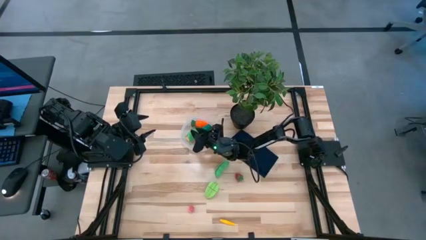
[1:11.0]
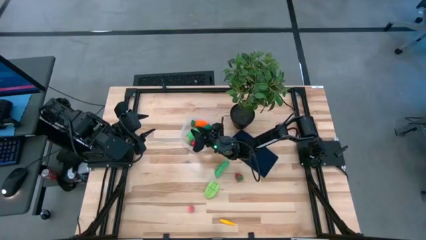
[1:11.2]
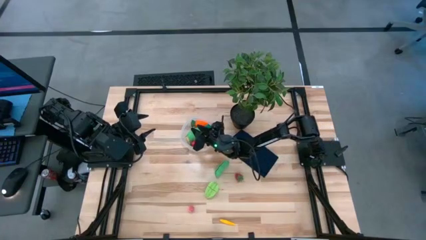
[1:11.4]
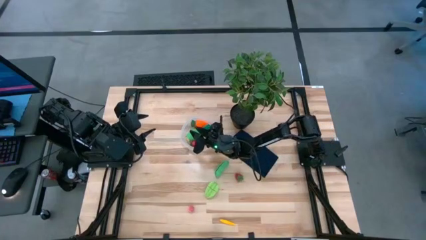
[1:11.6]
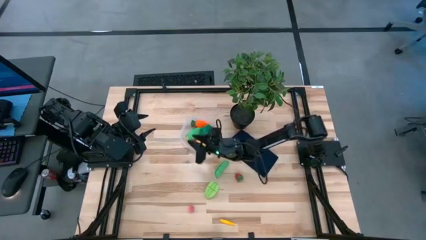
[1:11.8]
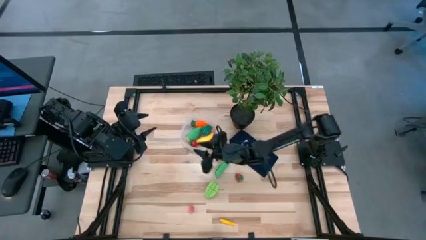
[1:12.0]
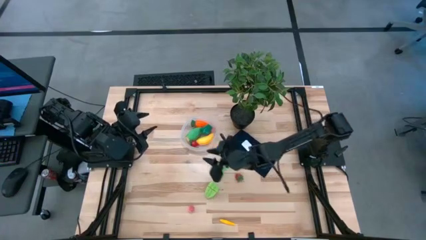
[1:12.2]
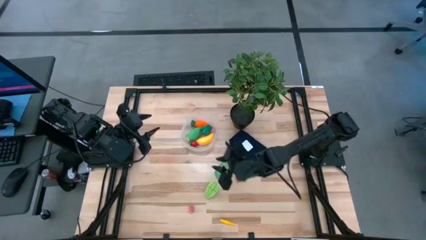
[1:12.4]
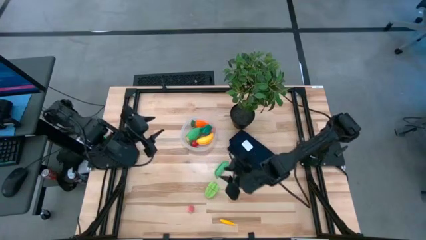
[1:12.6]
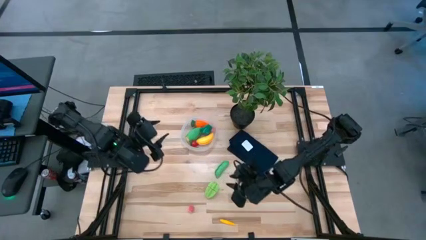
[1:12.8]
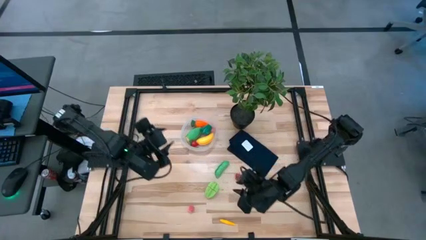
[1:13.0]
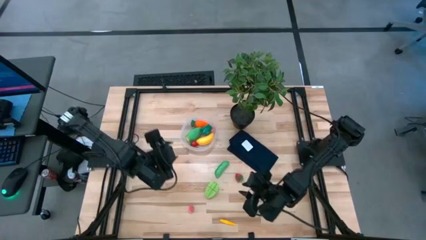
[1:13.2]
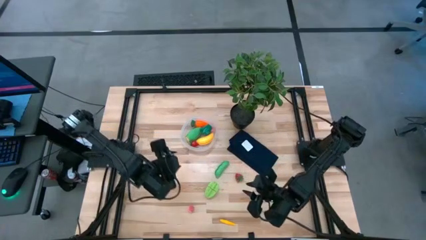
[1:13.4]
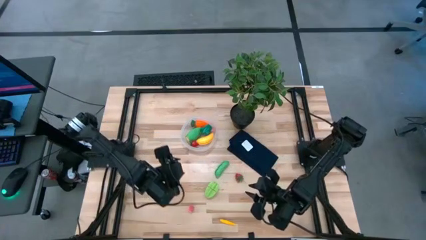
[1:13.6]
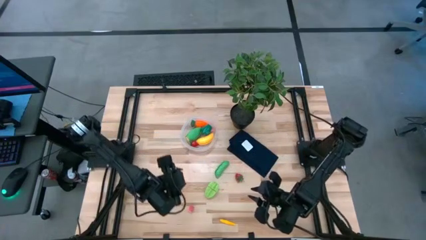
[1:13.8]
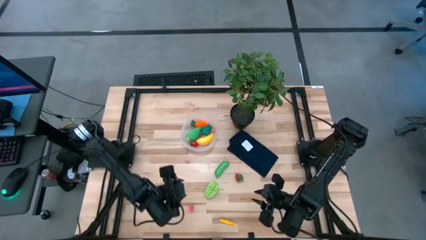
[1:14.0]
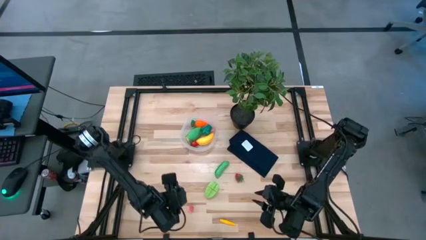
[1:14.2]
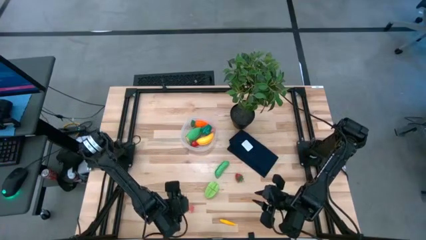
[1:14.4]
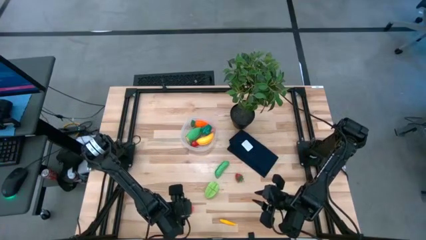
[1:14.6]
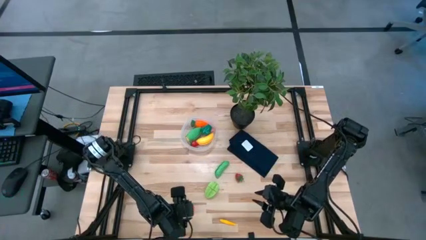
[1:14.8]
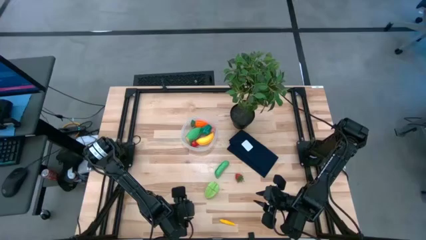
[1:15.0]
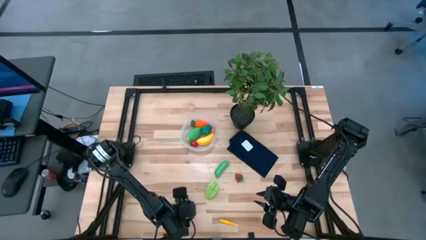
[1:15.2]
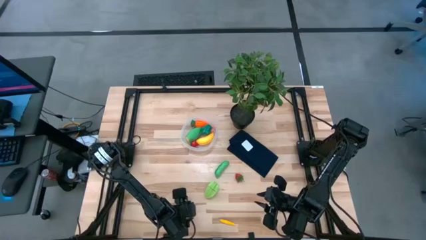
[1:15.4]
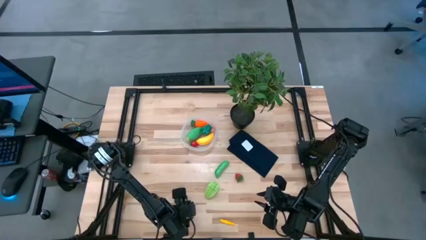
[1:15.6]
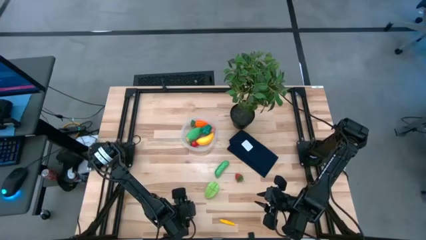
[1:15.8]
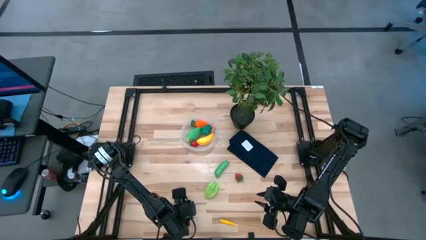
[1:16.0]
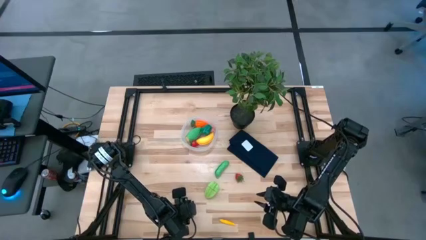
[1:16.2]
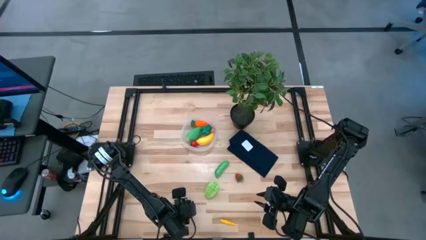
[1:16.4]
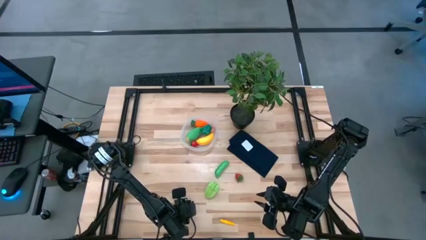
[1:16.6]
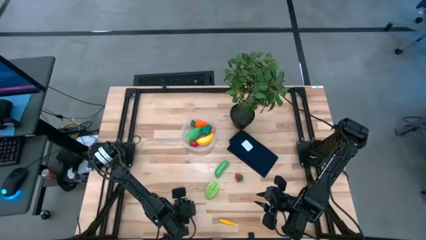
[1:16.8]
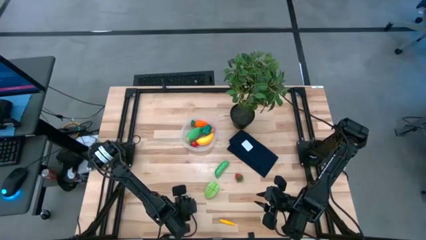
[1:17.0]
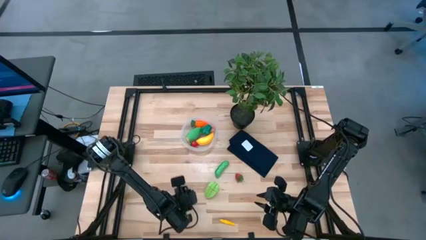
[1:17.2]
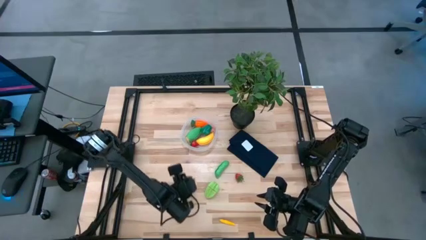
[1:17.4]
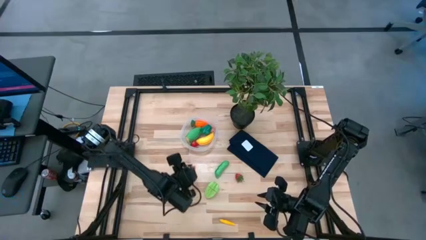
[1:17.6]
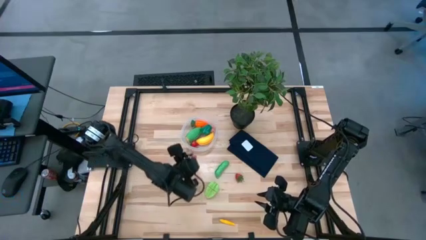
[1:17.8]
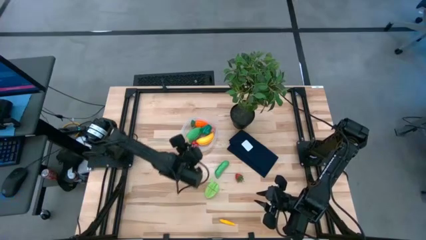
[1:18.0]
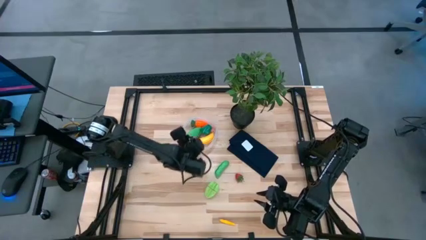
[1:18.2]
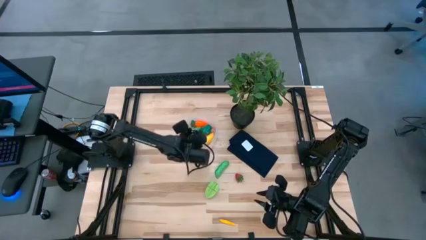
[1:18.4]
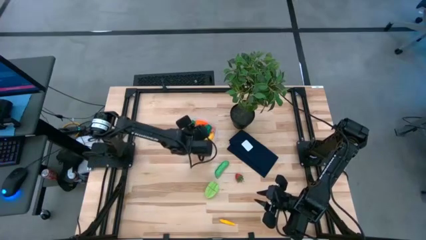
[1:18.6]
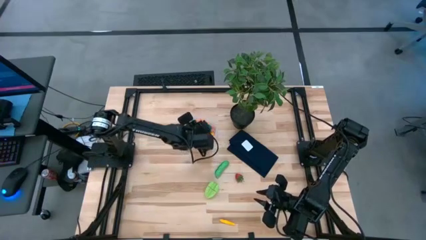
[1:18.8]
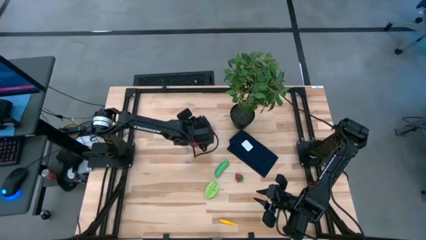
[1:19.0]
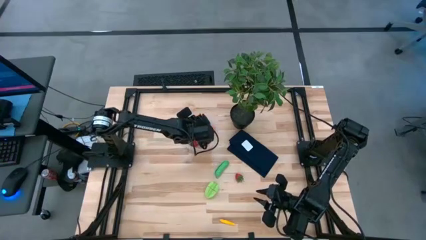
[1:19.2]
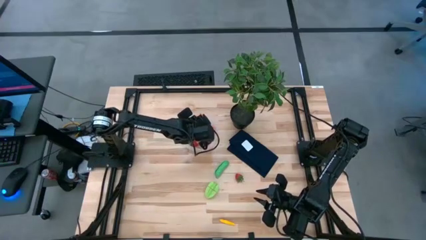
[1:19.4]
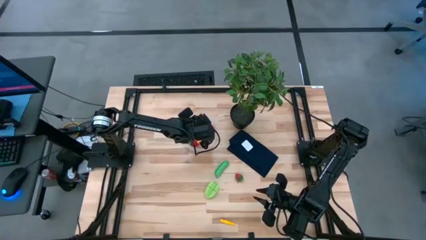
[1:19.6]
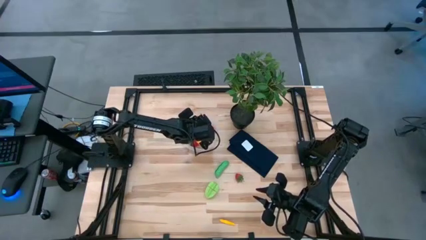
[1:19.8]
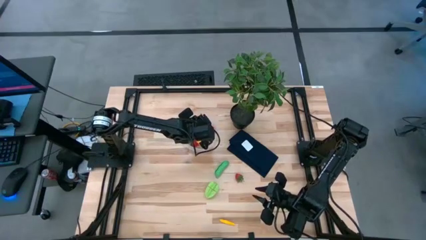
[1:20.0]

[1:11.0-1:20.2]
Task: Pick and placing Produce into tupperware
Put the pink peach into the transparent bin

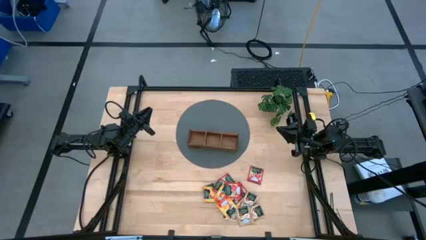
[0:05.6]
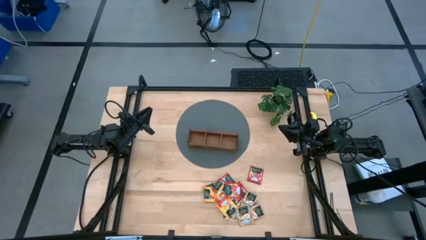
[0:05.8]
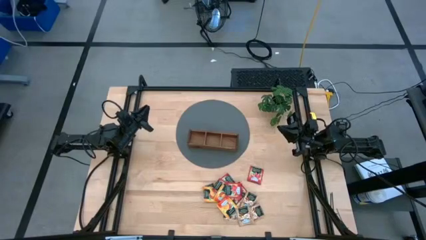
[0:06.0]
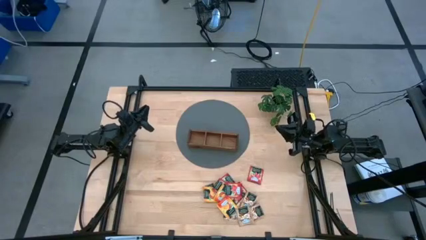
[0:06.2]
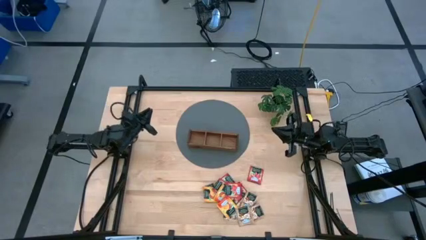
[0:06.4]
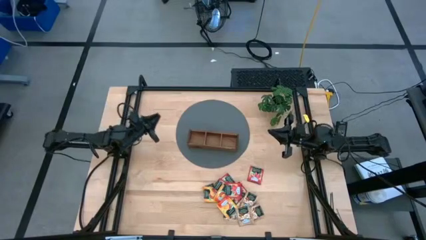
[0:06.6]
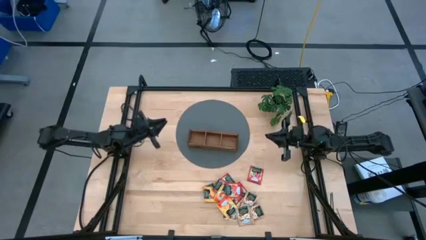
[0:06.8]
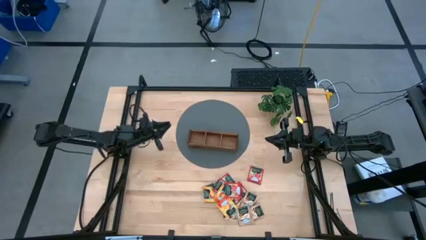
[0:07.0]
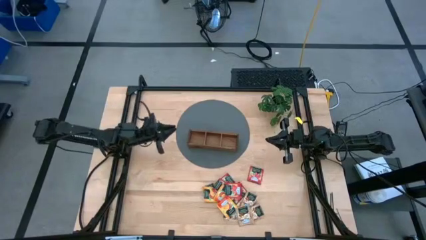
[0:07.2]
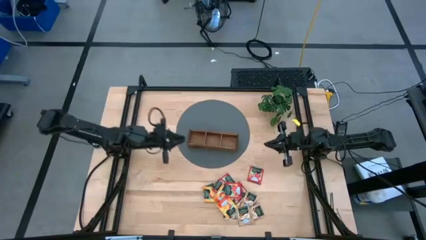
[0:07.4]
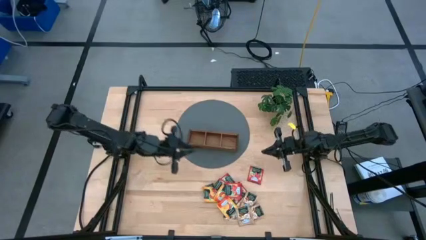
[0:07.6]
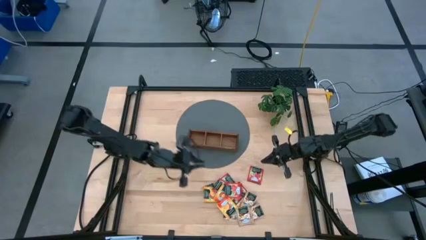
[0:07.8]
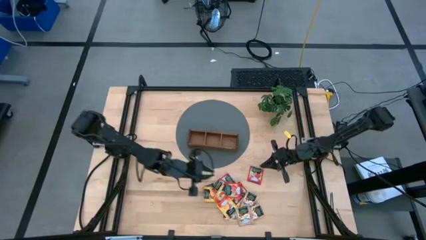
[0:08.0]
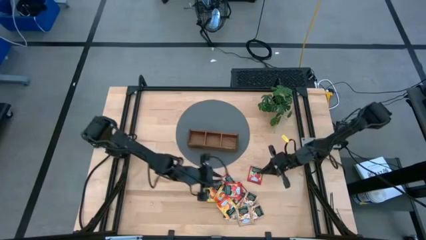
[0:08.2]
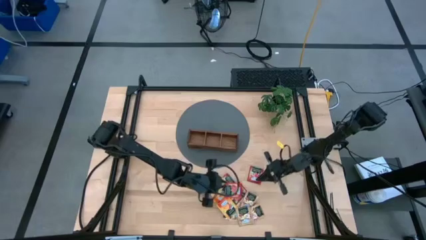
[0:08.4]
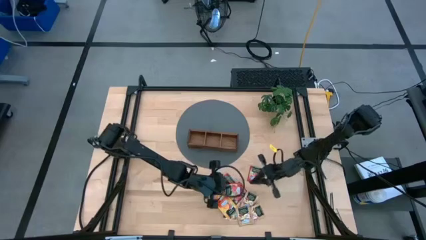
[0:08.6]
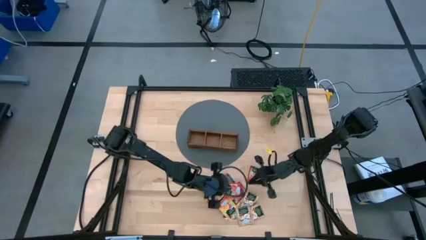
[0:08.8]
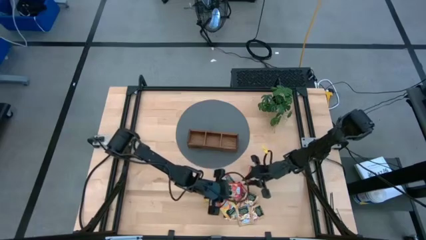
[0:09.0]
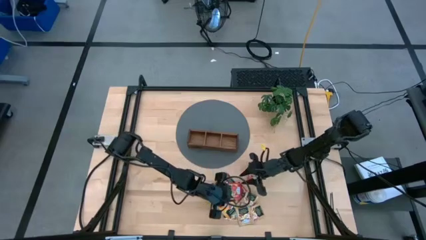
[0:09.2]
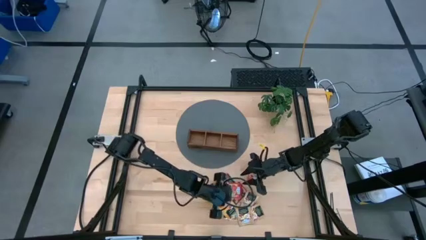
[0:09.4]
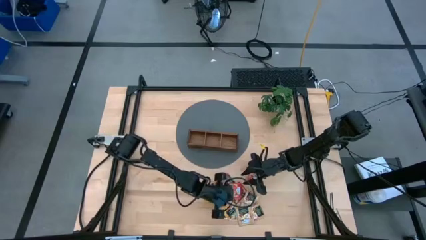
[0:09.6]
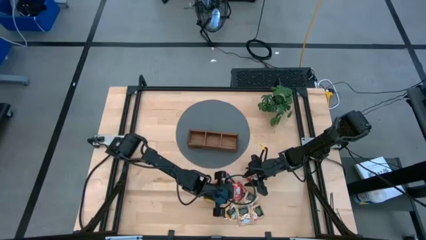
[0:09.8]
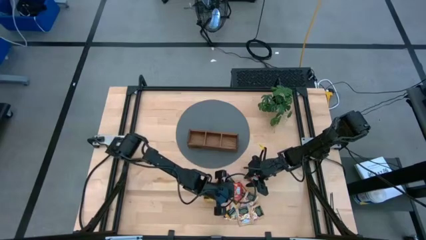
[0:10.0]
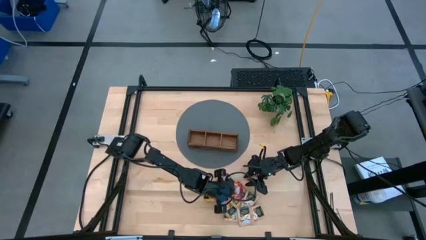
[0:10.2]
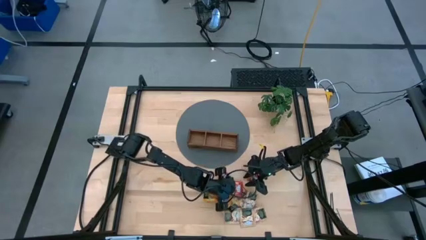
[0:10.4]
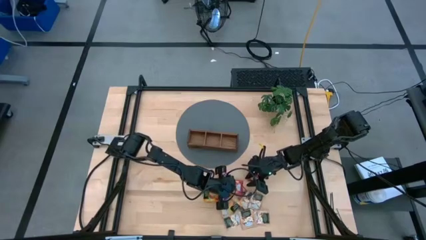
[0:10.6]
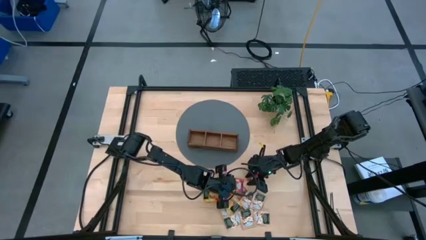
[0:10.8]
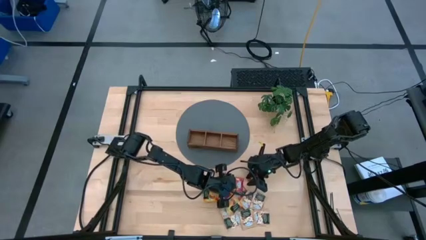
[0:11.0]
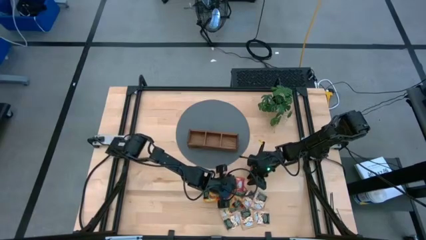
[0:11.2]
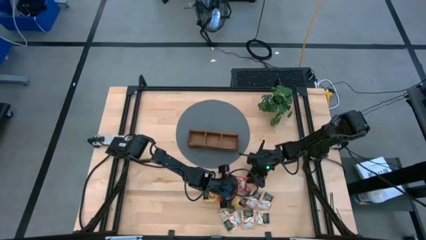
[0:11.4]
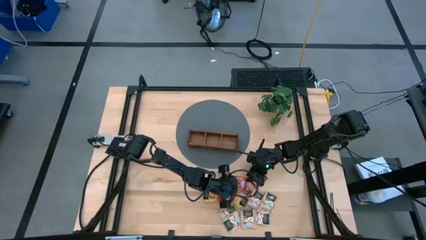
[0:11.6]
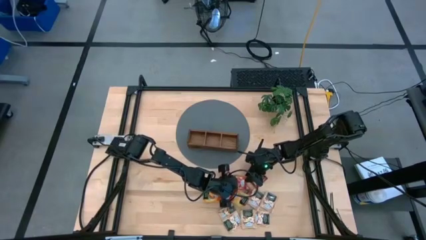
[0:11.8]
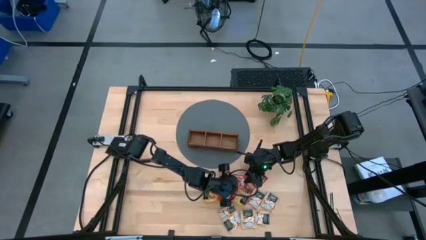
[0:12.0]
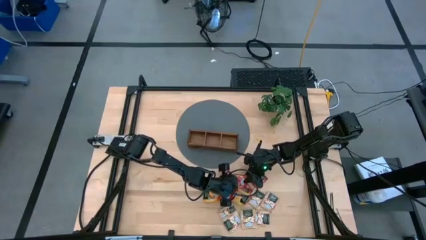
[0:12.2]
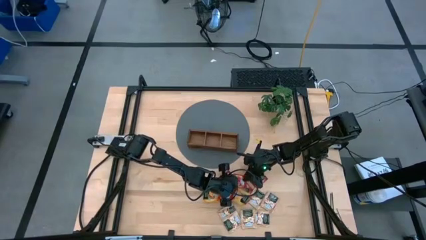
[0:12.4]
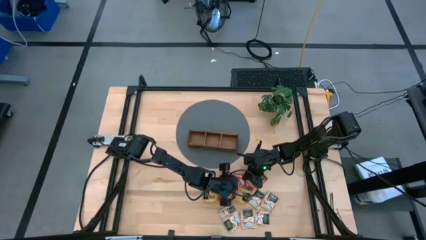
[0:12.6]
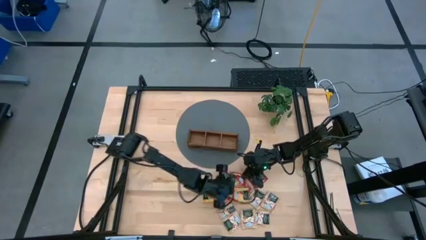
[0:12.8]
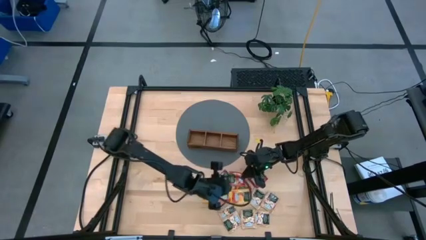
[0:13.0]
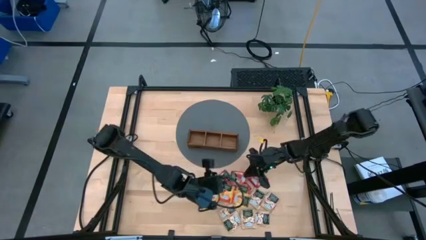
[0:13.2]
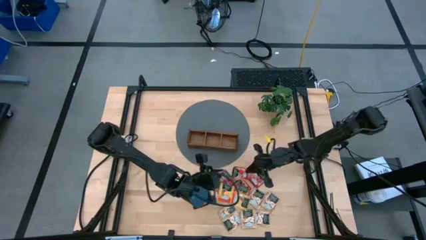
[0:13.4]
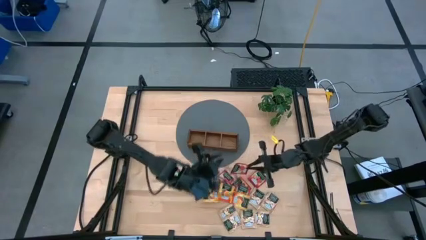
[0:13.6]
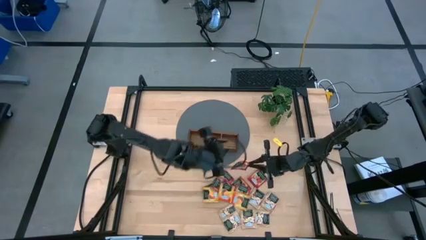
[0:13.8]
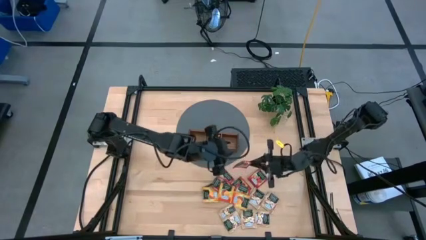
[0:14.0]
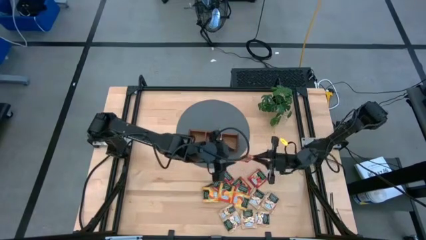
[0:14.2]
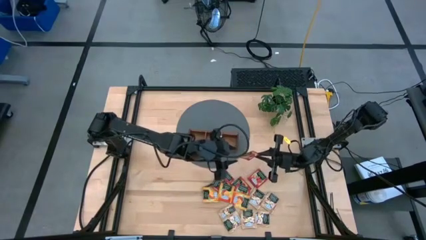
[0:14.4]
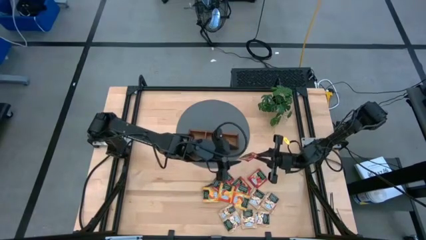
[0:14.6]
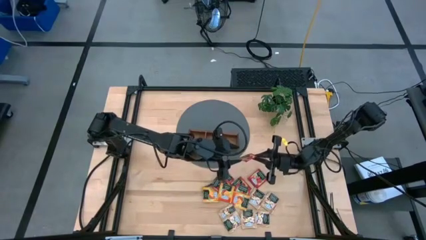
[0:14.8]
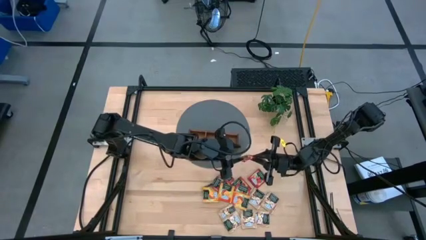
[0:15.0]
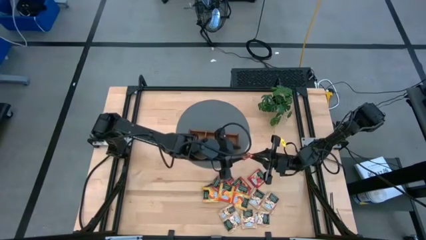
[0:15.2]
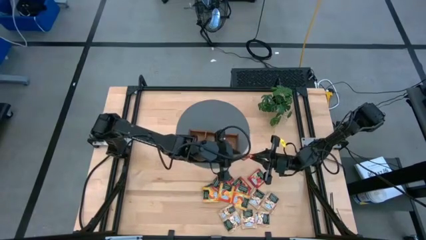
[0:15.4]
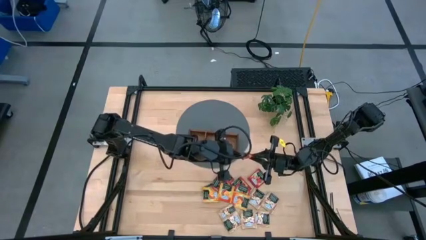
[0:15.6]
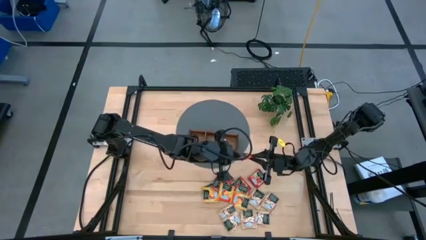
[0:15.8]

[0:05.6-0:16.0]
Task: Pick & Place Tea
Put the red tea bag into the right section of the wooden organizer
